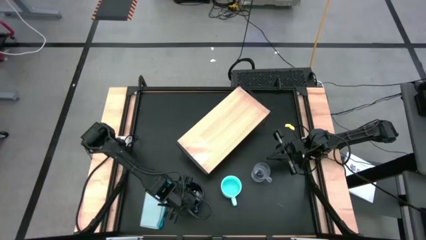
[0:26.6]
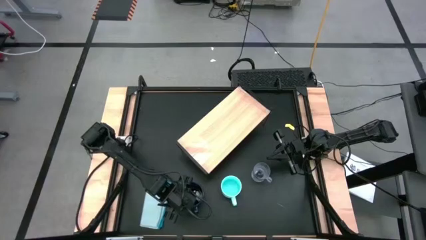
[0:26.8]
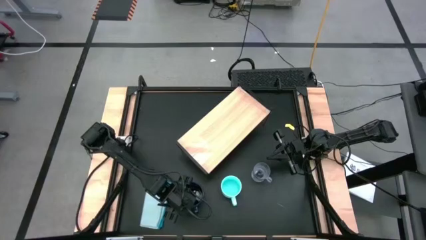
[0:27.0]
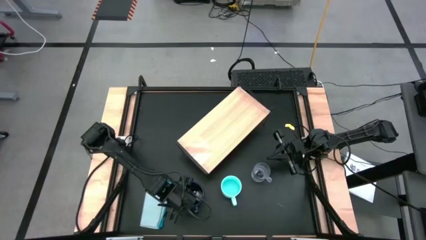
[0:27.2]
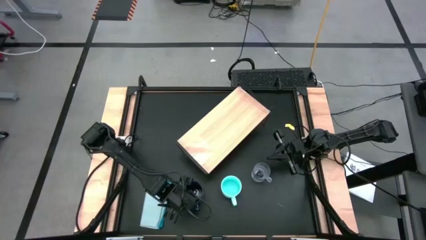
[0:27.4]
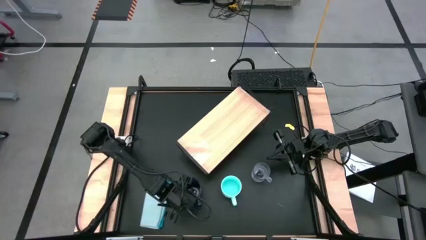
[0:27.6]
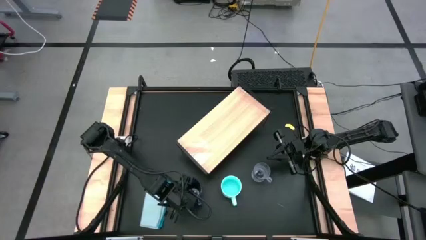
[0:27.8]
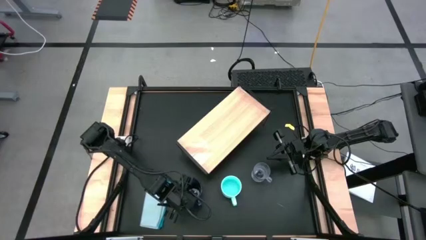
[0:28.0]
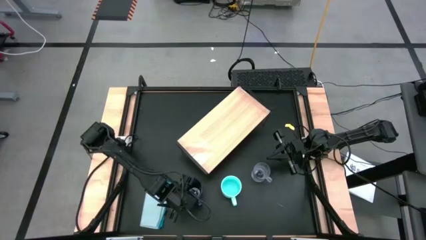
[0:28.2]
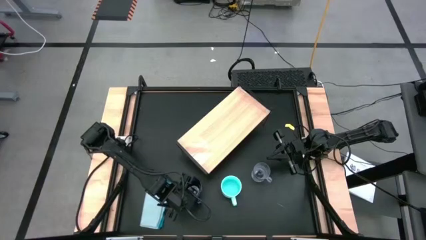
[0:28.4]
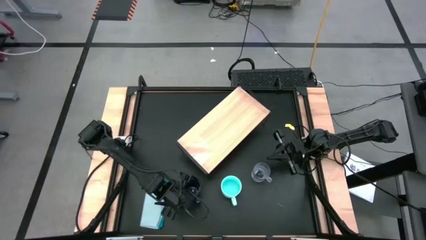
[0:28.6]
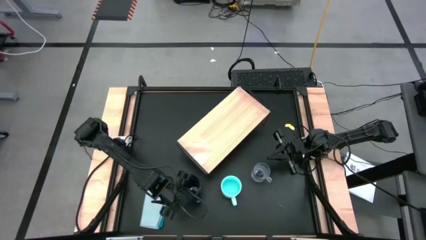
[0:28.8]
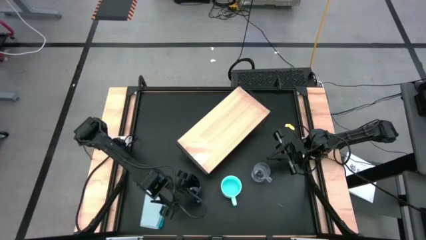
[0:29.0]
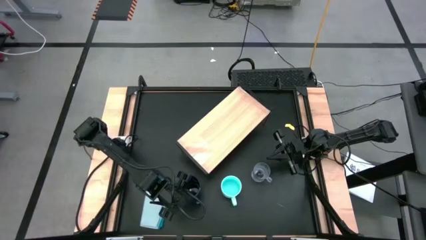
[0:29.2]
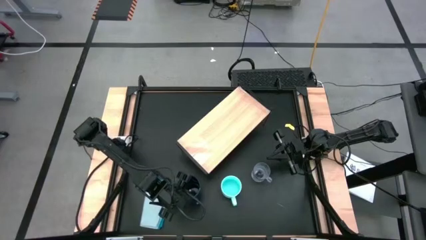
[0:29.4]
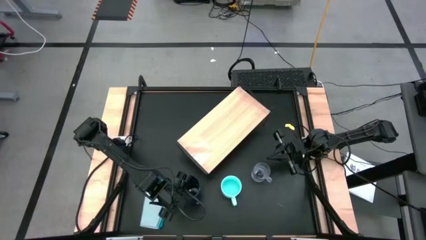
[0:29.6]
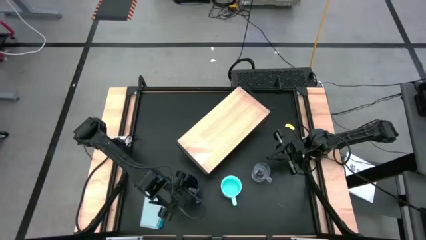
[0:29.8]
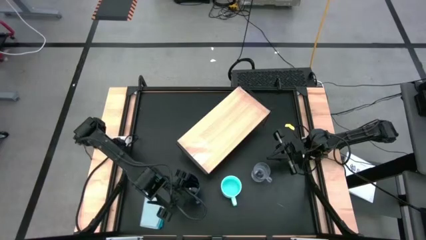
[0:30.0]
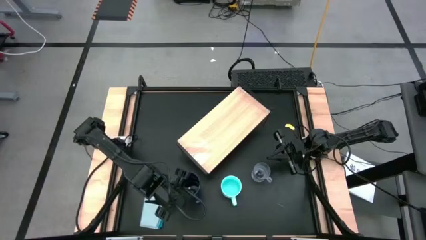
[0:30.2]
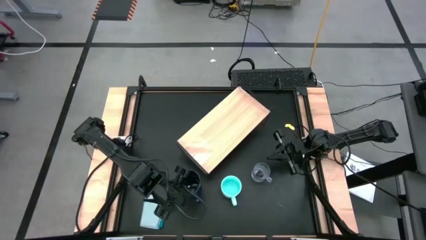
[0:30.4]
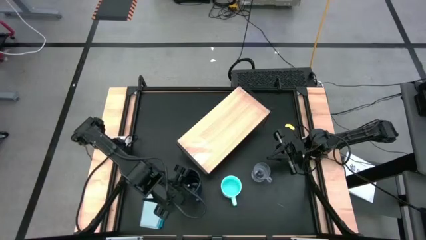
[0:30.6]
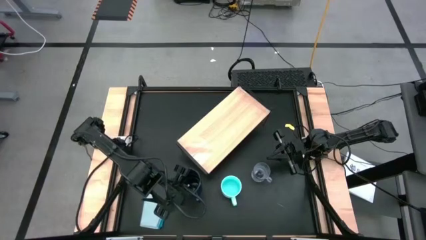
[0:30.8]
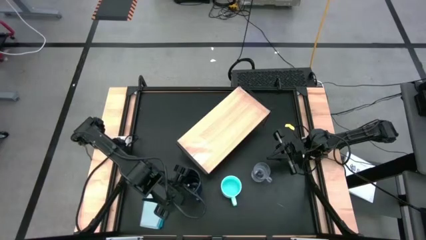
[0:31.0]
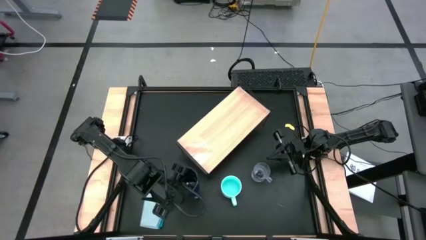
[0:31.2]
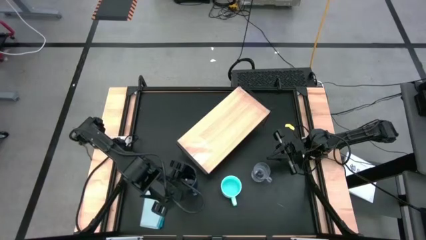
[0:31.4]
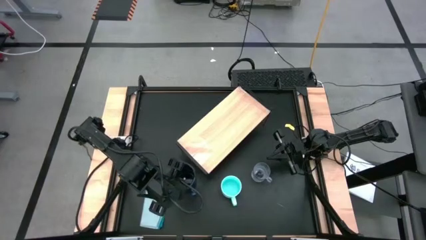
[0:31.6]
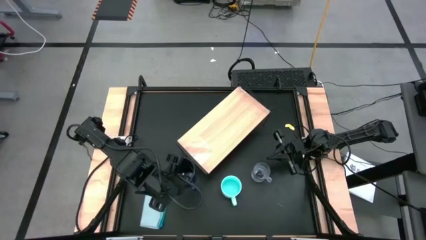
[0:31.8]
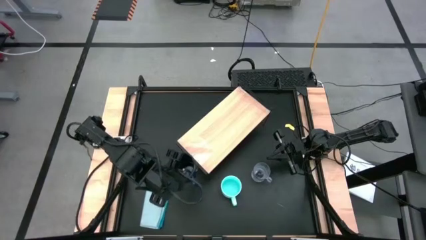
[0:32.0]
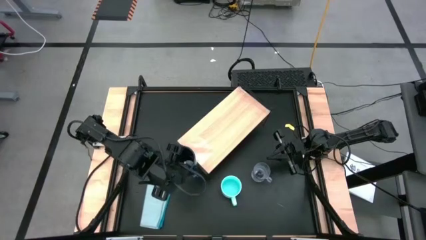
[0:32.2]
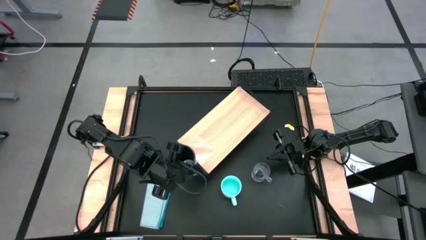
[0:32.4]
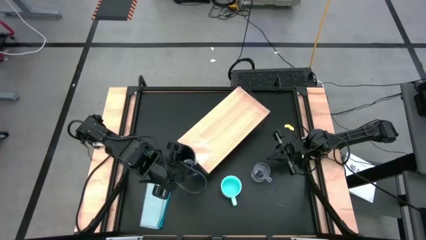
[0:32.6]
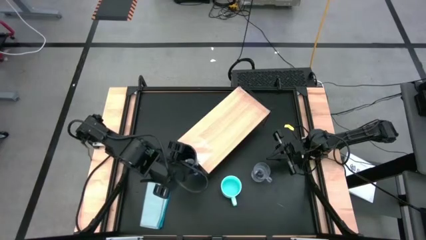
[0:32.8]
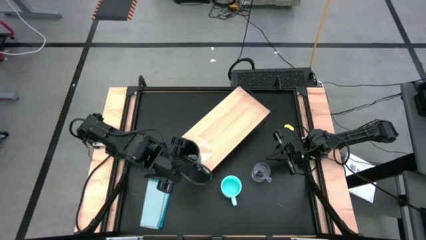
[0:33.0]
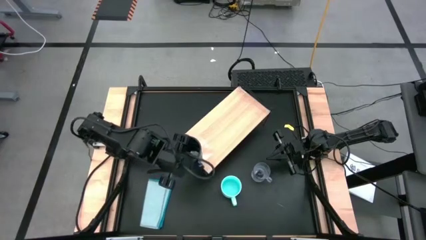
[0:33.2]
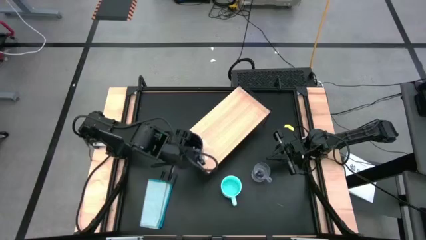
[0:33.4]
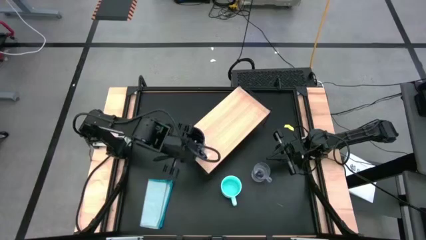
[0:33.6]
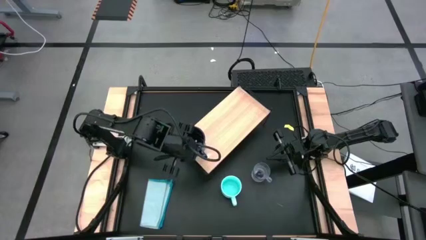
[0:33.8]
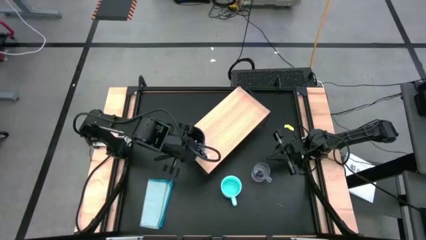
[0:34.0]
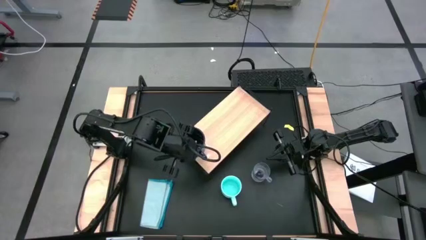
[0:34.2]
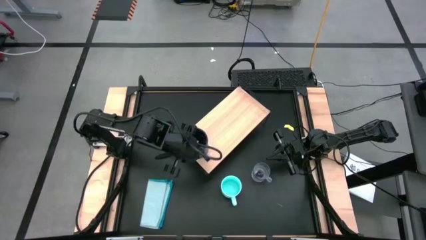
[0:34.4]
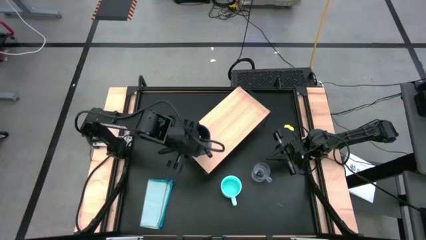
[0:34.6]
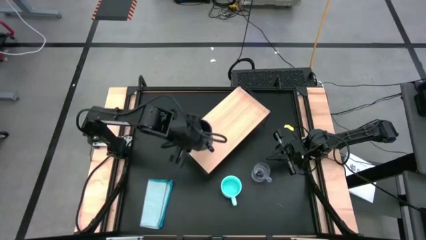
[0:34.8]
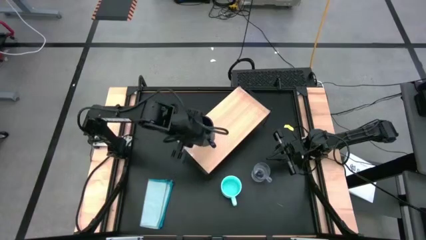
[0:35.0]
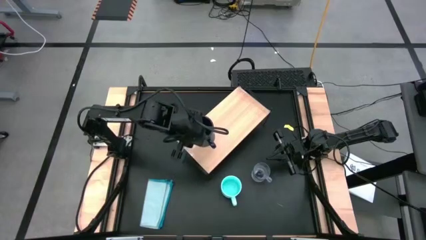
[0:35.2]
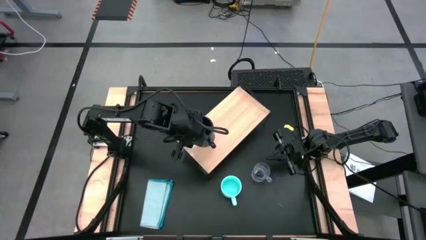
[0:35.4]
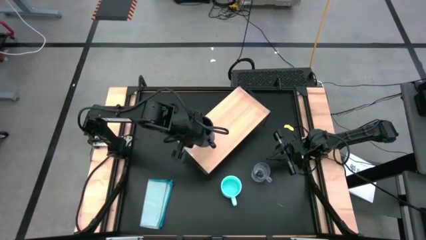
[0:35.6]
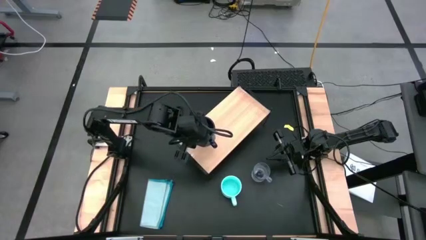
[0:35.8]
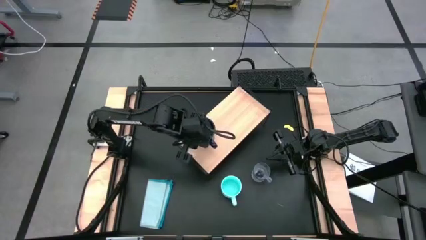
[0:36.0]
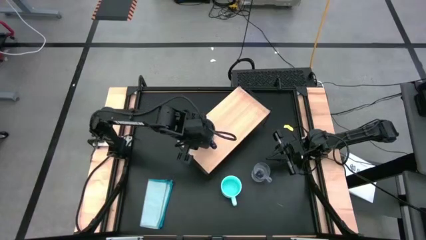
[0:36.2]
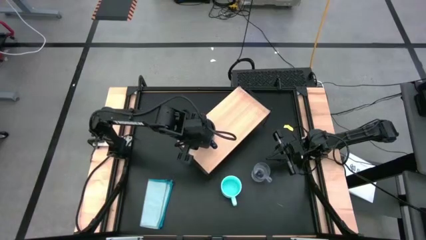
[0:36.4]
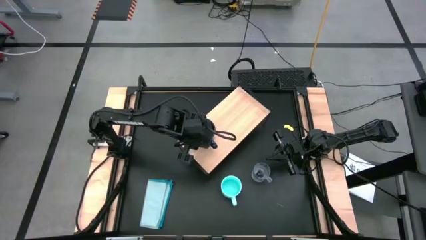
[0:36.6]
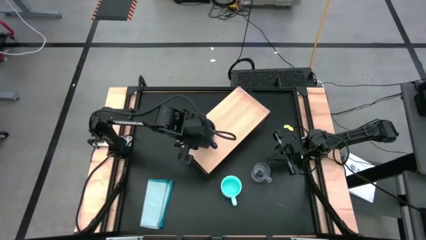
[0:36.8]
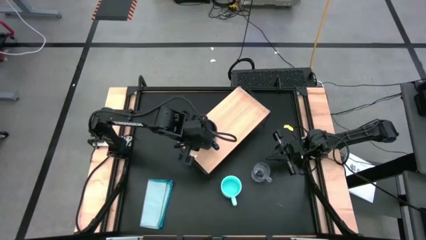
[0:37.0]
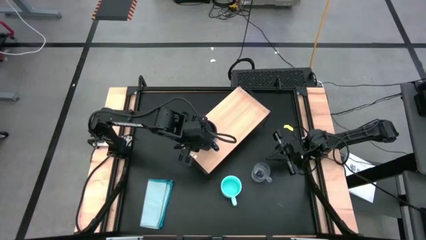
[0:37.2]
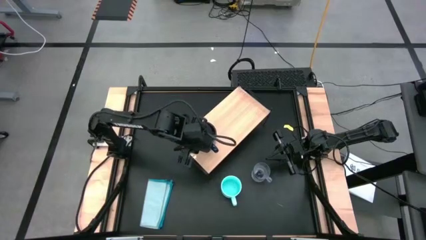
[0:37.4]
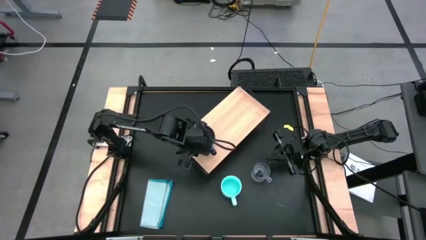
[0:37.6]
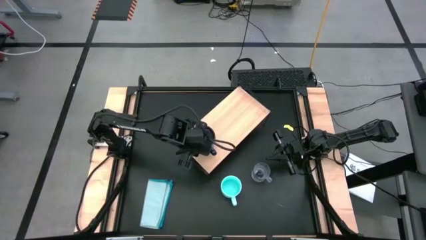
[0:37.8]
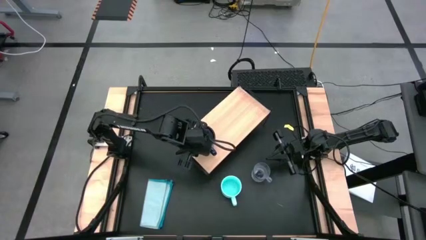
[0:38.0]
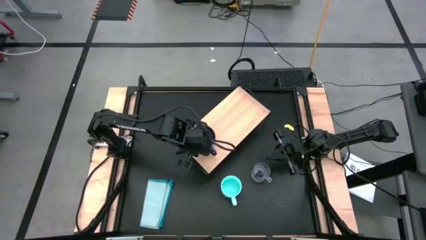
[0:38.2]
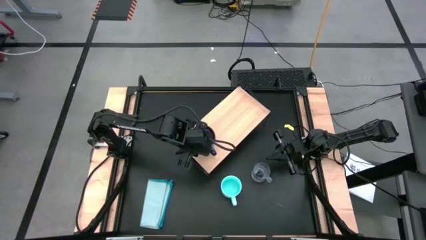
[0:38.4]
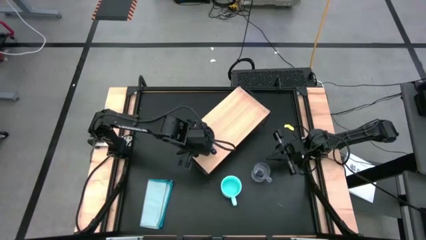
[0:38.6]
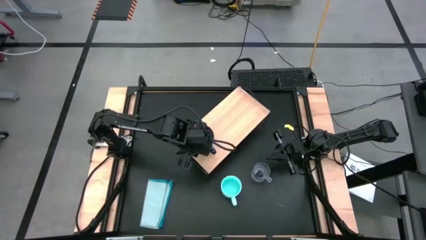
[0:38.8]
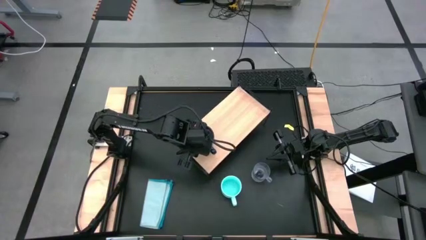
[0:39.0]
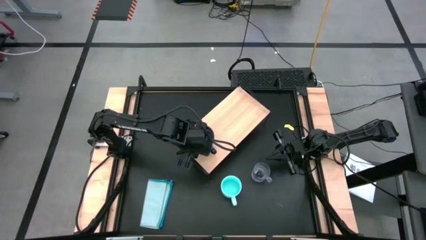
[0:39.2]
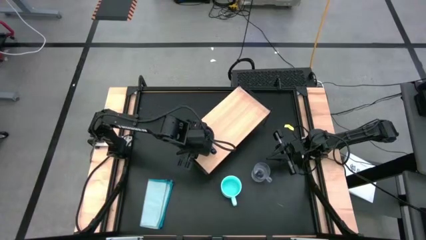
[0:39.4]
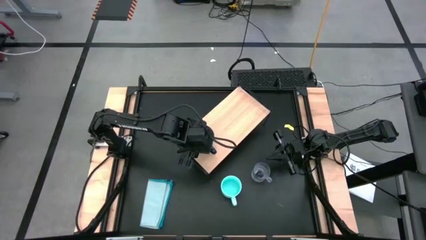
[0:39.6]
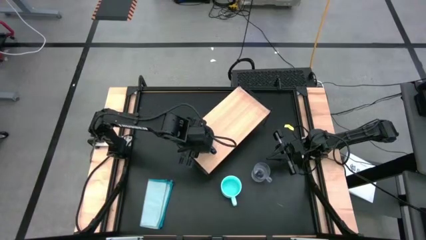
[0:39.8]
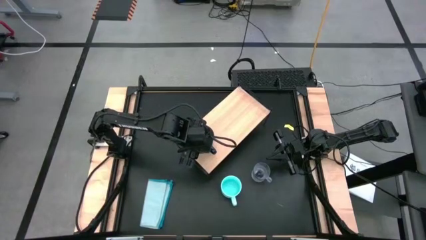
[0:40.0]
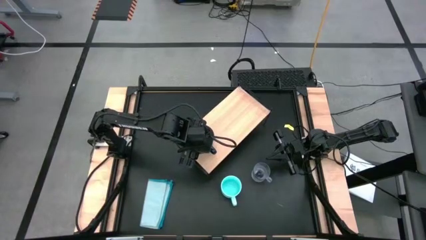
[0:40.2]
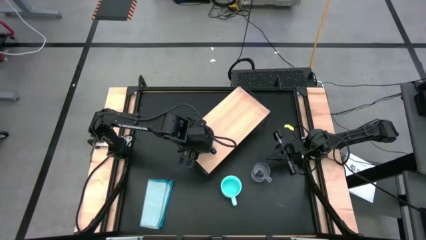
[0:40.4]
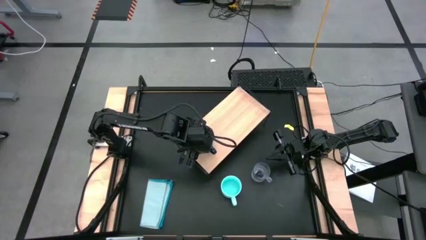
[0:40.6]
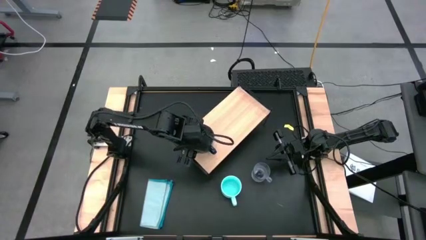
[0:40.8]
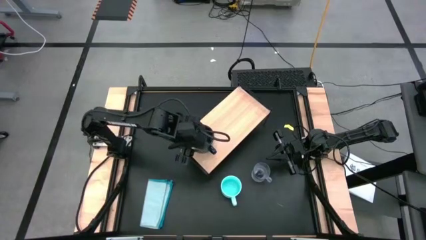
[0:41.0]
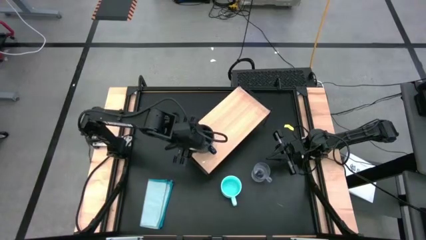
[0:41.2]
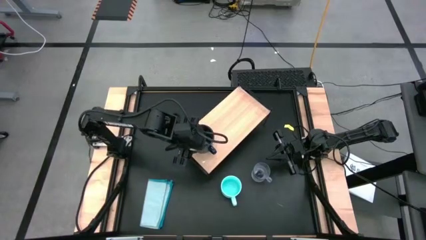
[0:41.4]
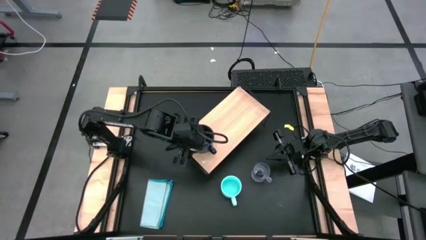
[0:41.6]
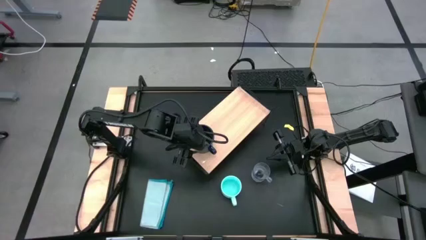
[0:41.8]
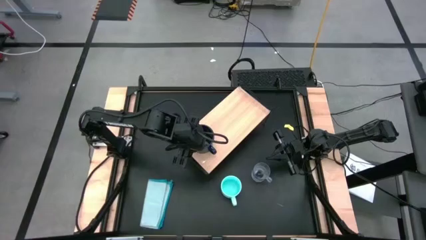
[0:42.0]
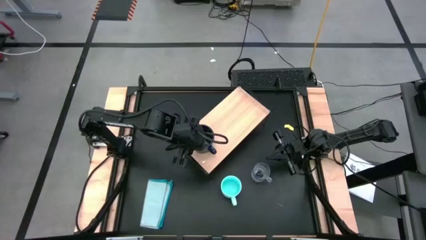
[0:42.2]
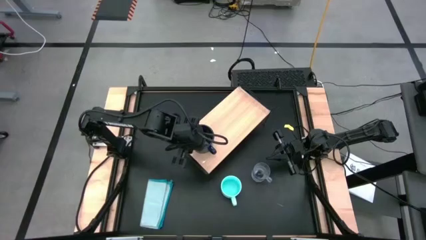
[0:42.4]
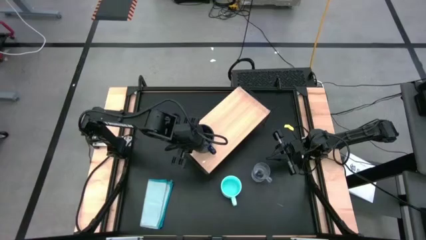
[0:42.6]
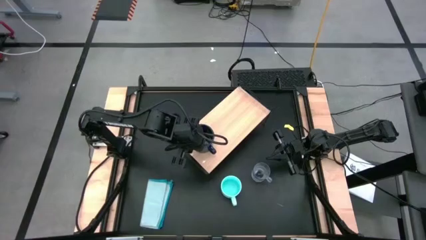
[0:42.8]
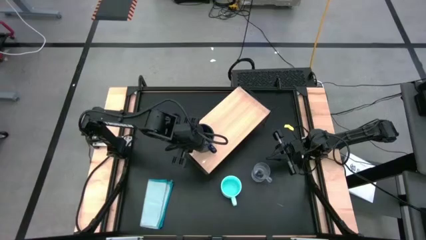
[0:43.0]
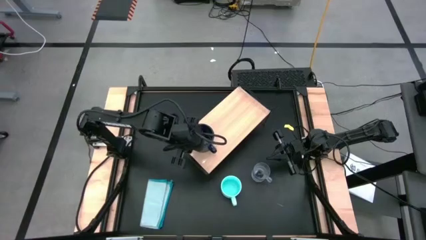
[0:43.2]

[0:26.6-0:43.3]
Task: Stack small to large cups/mugs on shelf
Put the dark blue cup on the shelf
